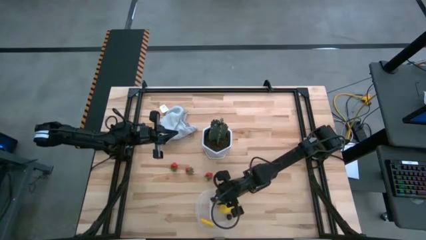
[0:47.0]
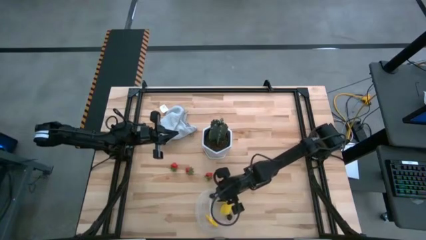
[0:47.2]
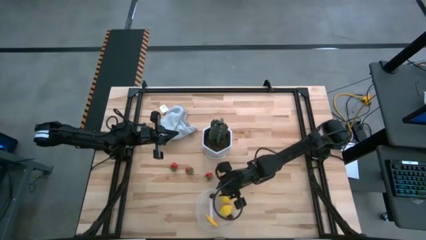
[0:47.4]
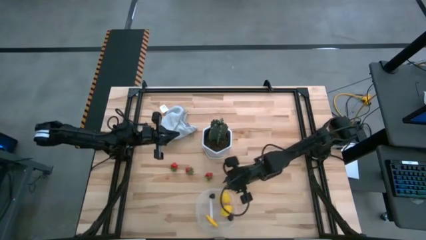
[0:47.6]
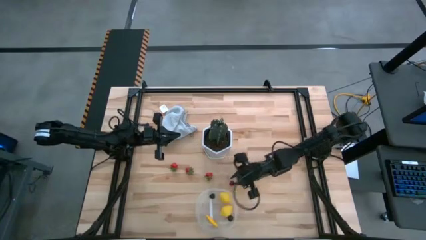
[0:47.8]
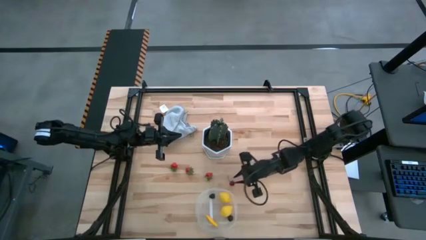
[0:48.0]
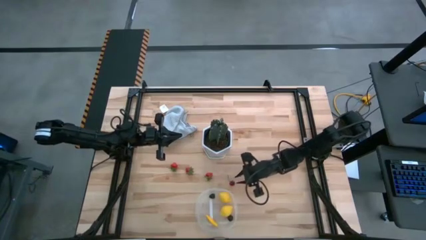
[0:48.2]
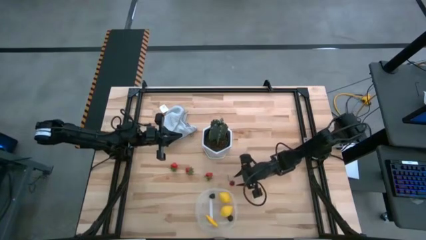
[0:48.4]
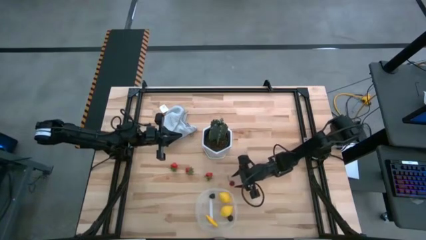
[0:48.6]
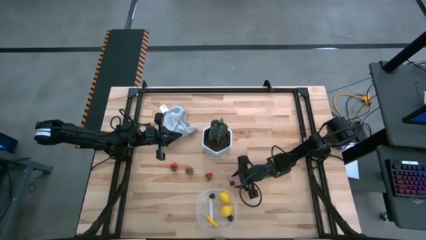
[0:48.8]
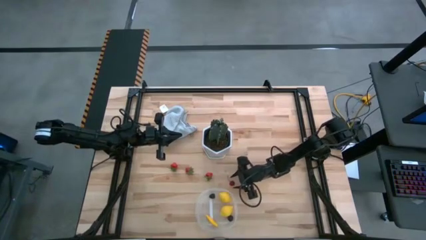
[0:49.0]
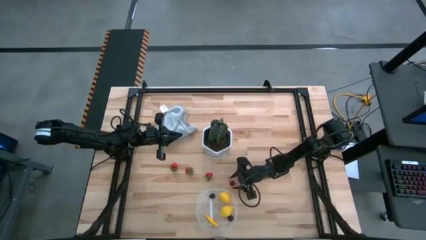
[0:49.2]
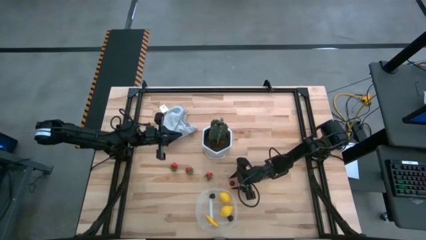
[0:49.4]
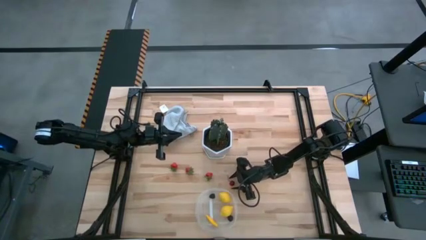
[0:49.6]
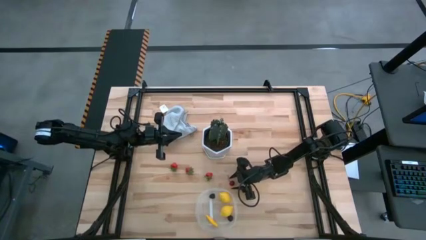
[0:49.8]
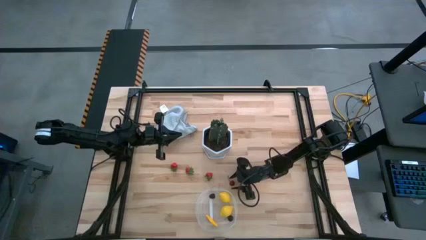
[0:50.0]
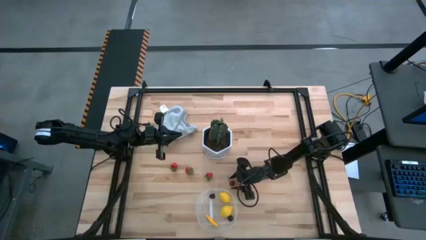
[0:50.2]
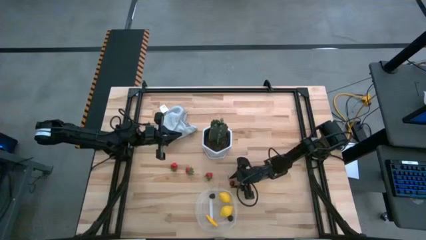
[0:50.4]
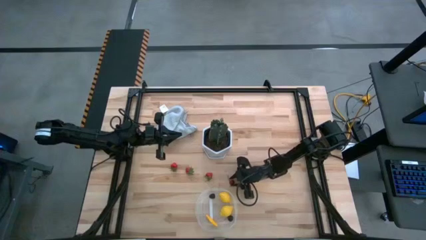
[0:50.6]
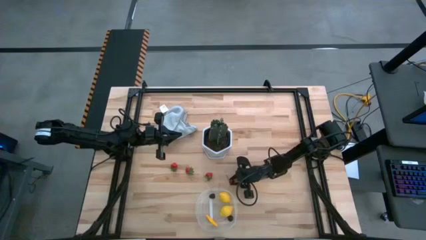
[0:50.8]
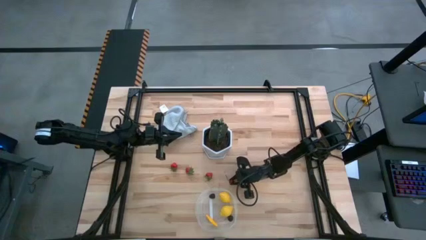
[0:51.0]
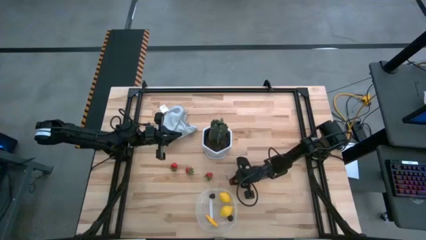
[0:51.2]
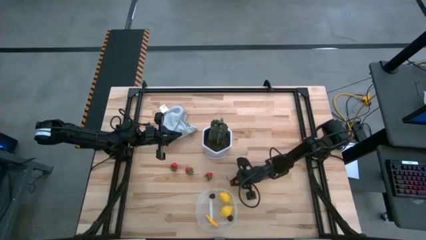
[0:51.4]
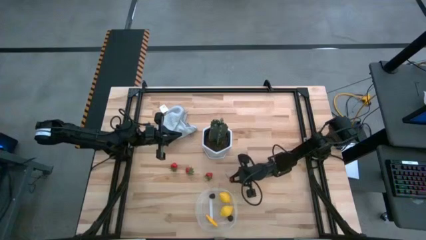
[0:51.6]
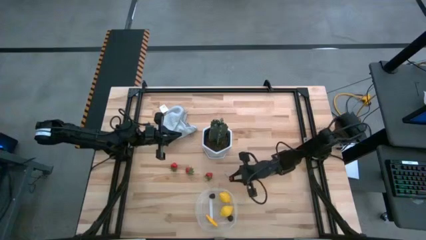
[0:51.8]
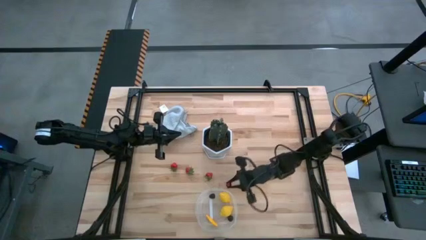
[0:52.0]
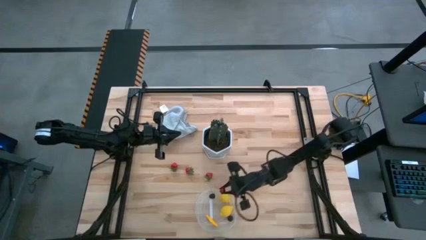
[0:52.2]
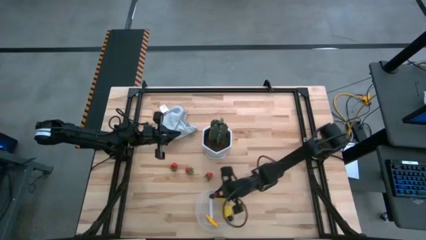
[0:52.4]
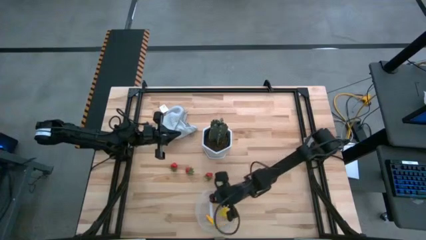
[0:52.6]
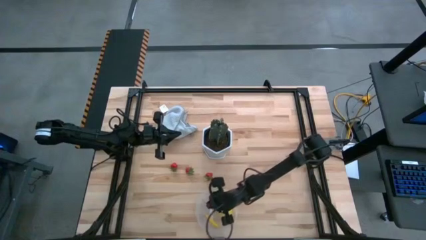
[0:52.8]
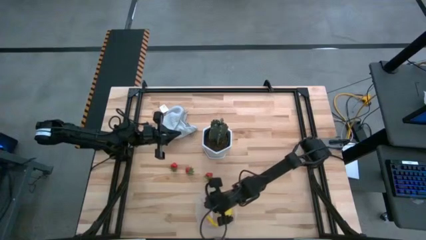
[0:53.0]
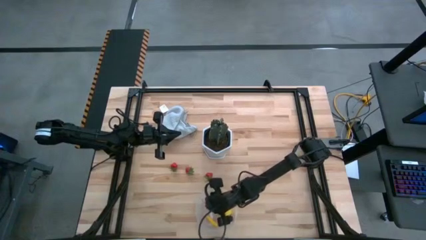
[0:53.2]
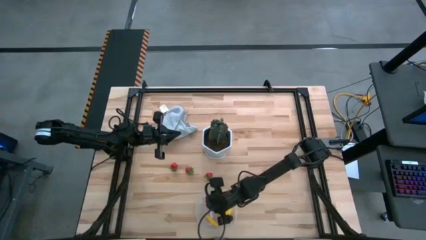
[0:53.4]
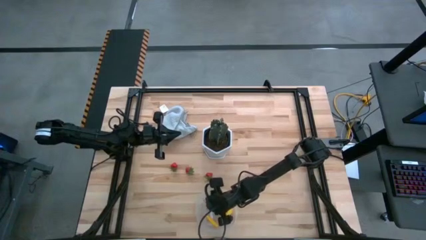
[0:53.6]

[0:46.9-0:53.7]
Task: Pick and placing Produce into tupperware
Put the red cherry into the transparent bin

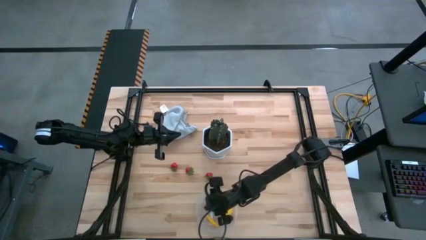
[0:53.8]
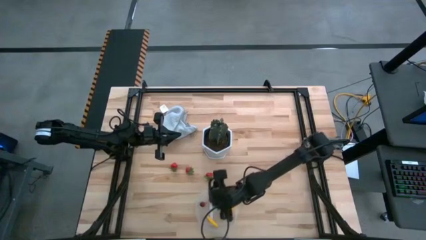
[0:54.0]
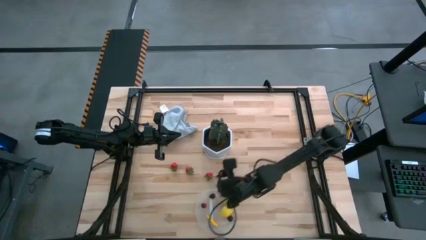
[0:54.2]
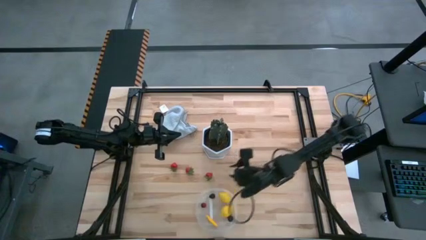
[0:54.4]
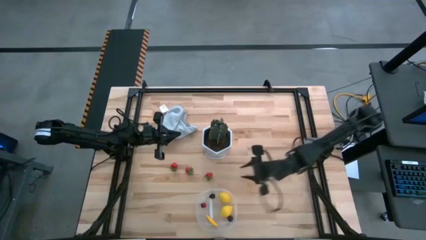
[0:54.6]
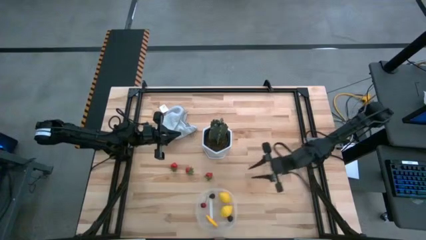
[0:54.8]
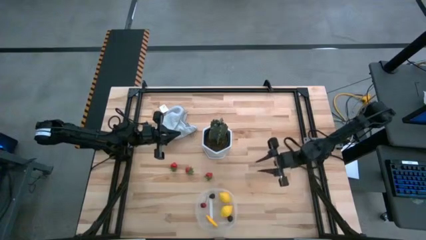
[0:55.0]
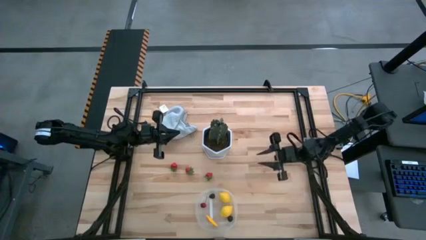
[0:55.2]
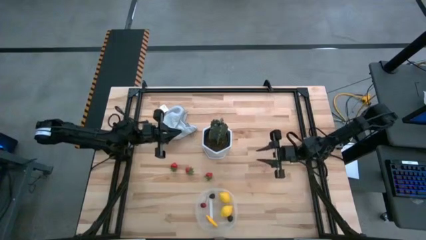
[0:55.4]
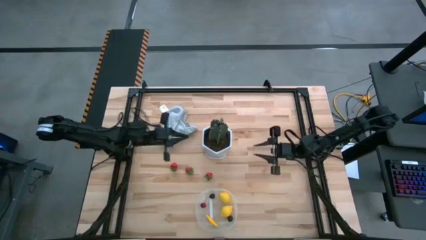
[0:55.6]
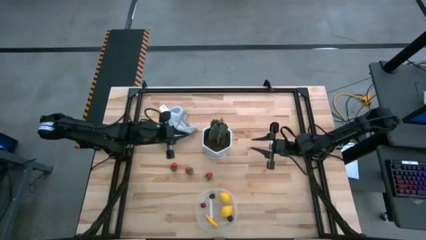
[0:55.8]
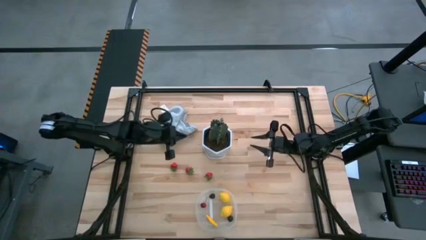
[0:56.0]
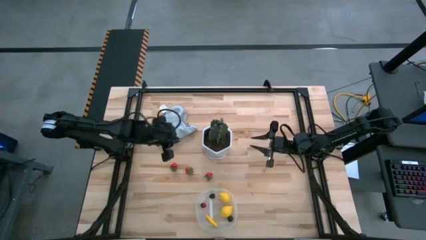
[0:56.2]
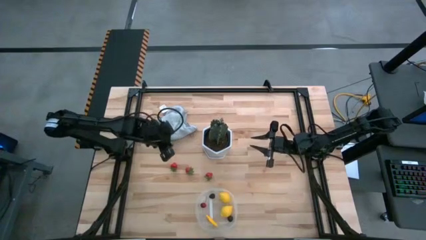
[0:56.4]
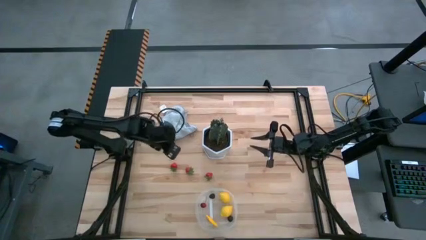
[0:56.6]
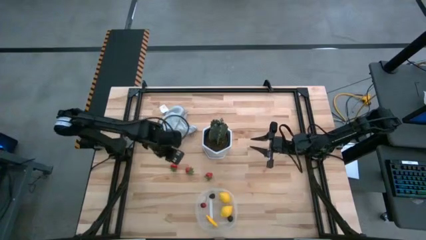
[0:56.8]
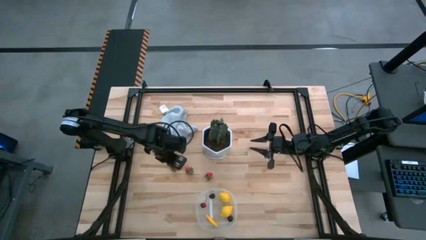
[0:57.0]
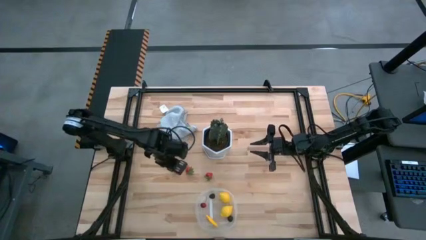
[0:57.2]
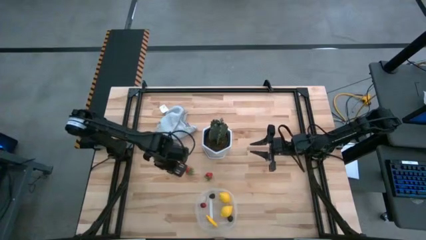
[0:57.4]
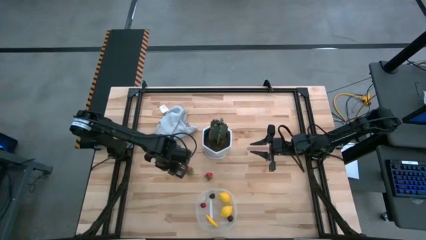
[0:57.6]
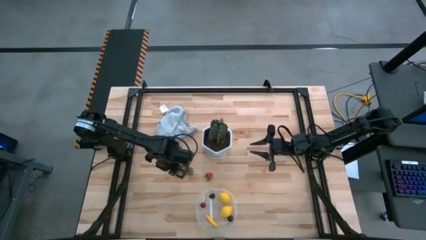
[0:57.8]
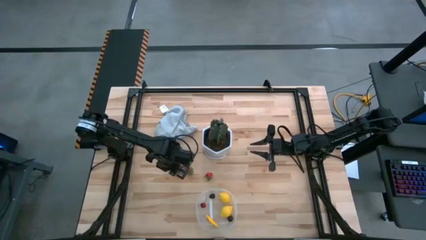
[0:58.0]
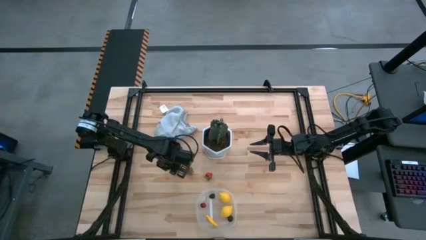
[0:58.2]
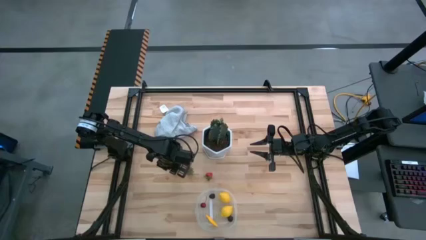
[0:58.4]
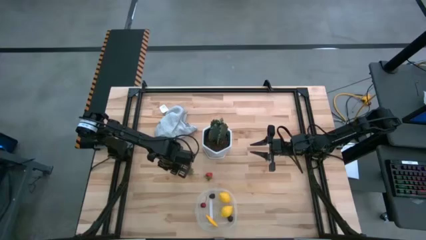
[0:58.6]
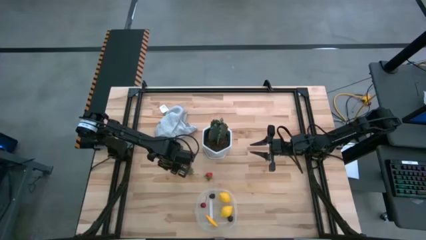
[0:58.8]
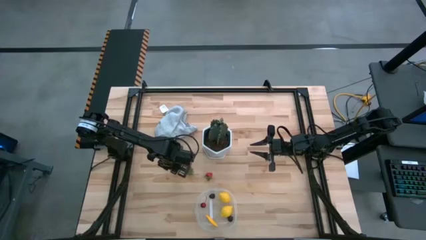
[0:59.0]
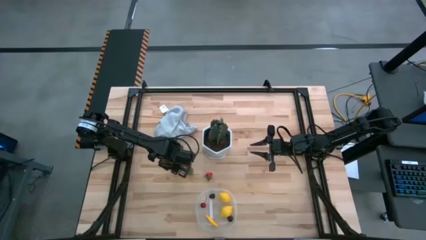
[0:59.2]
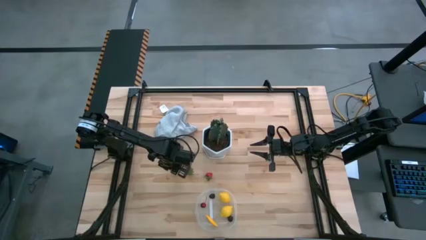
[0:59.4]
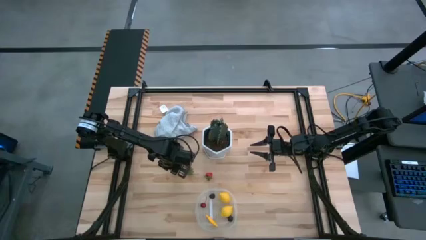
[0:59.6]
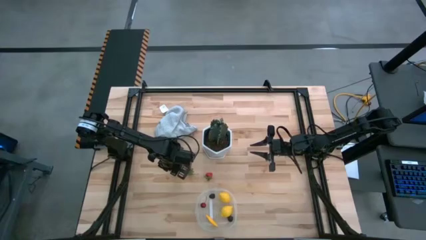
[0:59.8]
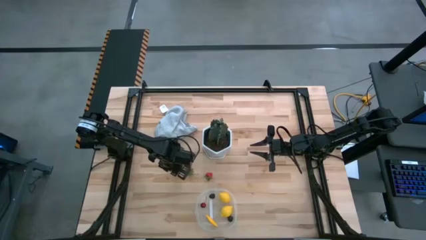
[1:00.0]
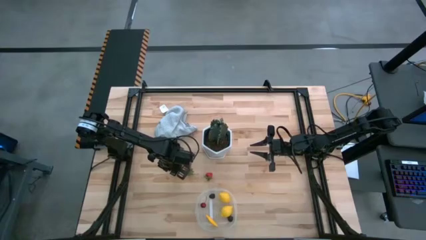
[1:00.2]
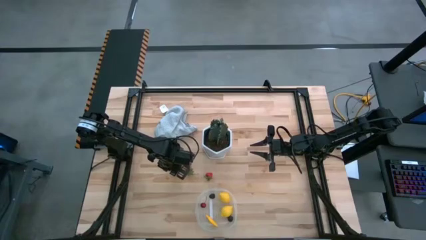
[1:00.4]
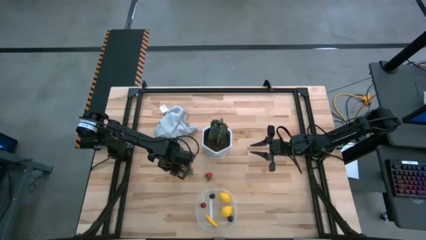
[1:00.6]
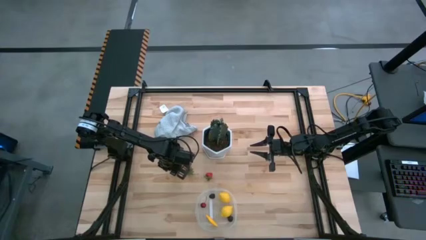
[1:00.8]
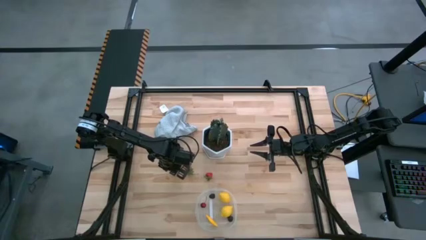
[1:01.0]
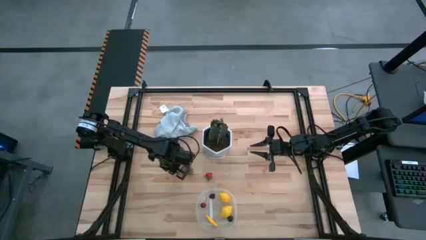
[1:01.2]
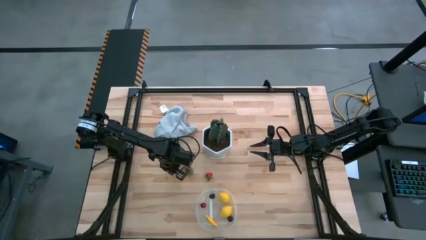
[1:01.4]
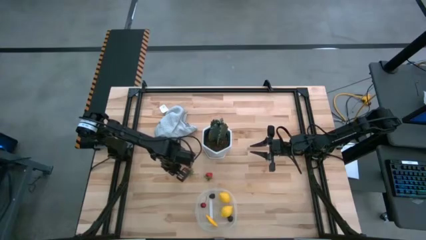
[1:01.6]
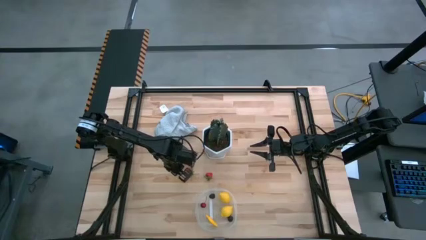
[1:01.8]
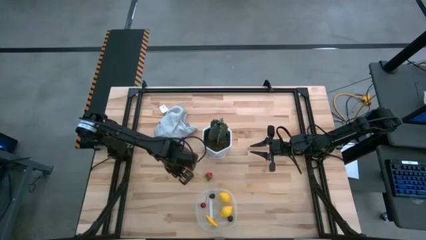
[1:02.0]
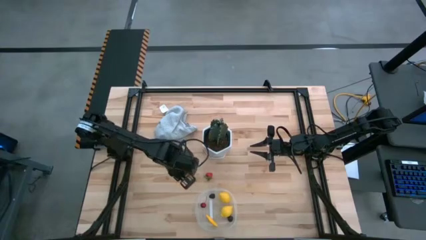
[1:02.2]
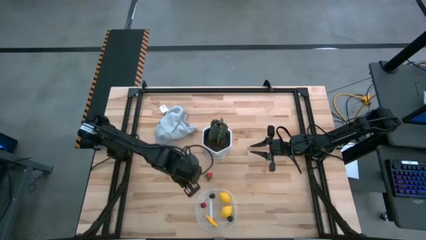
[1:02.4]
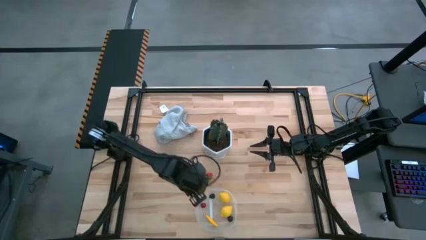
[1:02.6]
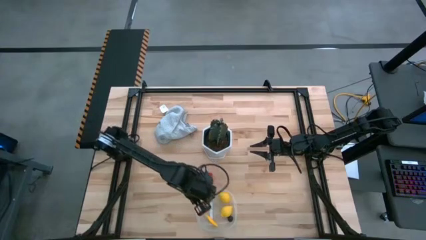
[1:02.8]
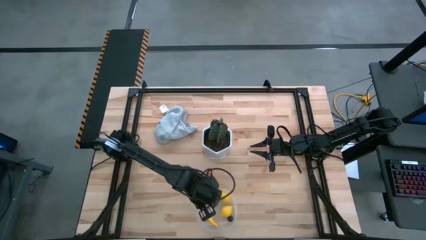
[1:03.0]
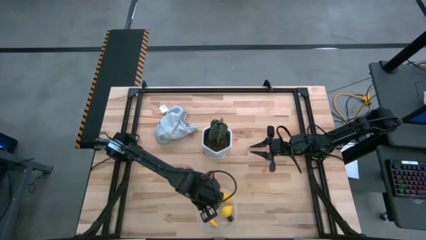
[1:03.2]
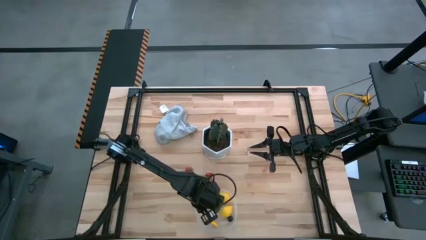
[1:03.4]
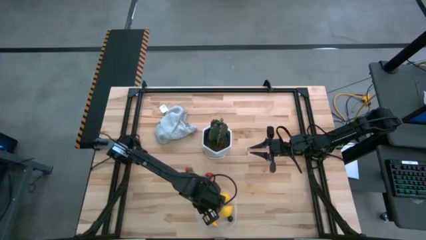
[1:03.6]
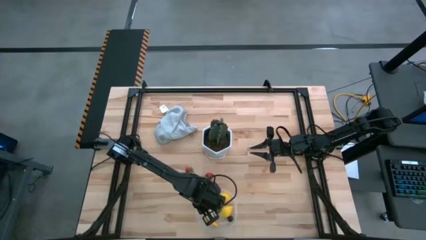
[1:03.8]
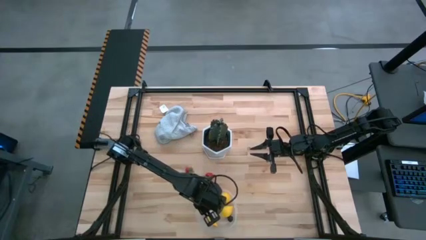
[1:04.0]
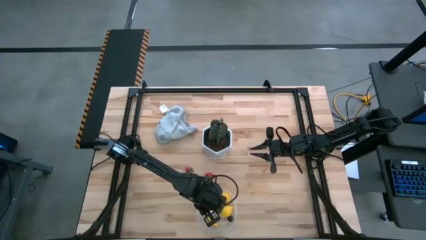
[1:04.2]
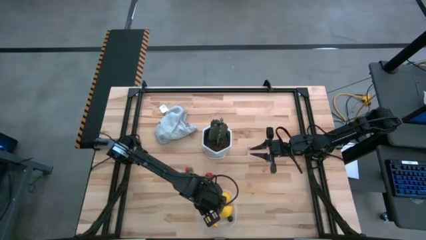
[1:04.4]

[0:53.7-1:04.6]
Put the left red strawberry into the transparent bin
